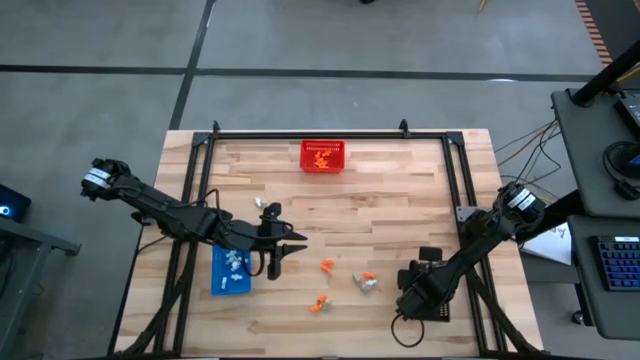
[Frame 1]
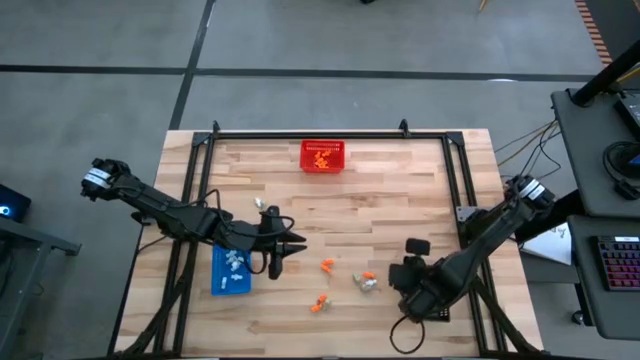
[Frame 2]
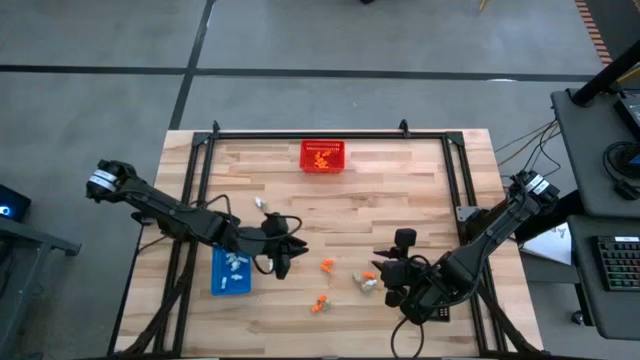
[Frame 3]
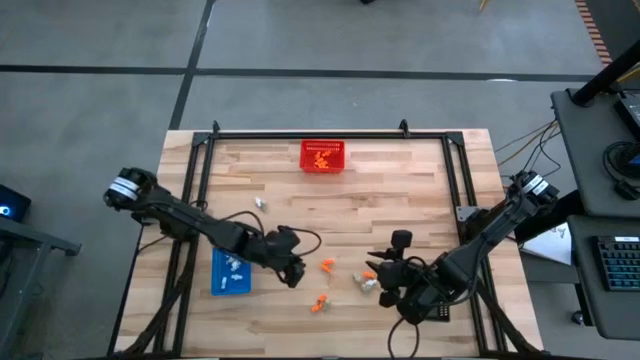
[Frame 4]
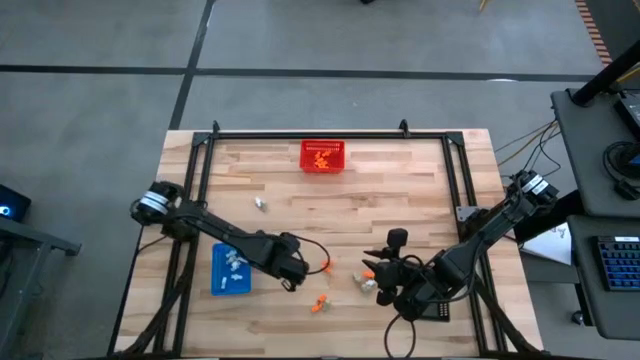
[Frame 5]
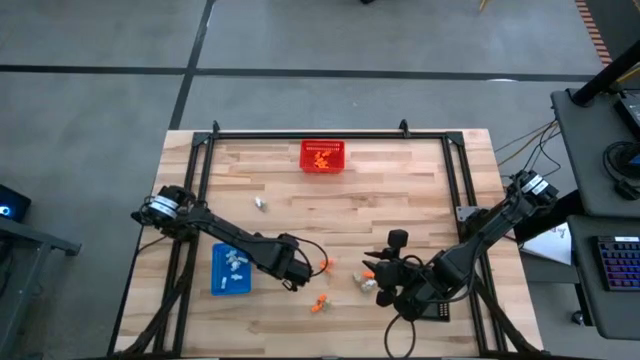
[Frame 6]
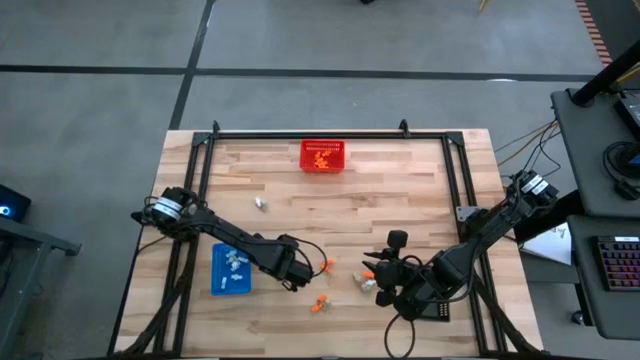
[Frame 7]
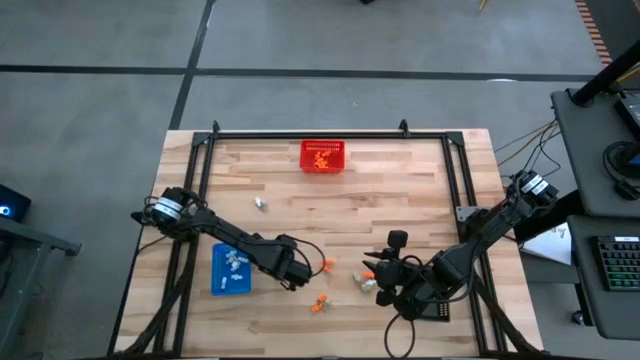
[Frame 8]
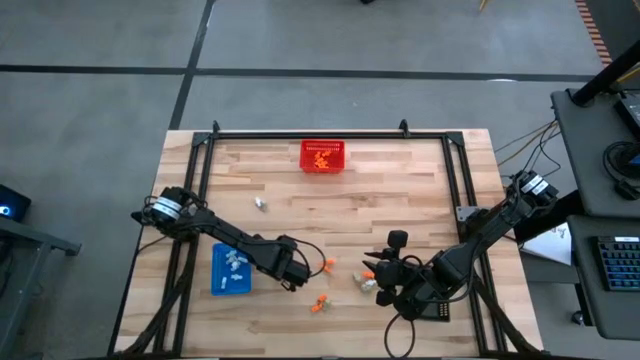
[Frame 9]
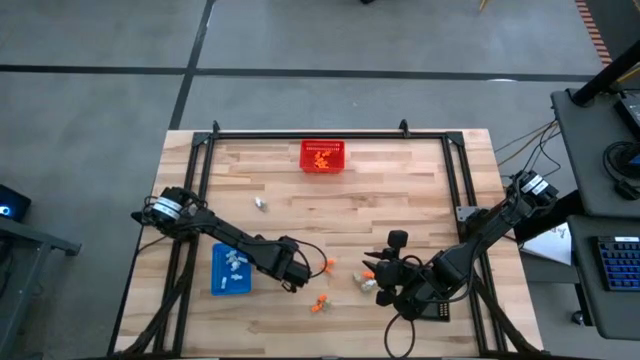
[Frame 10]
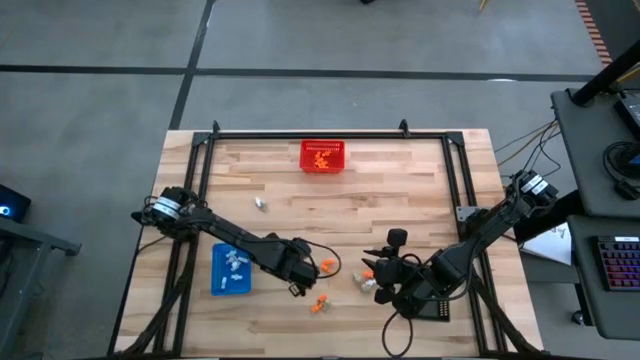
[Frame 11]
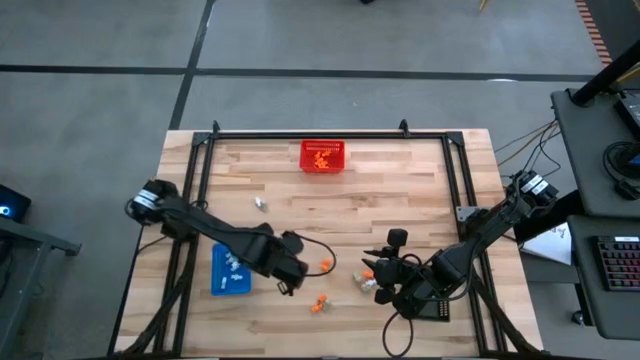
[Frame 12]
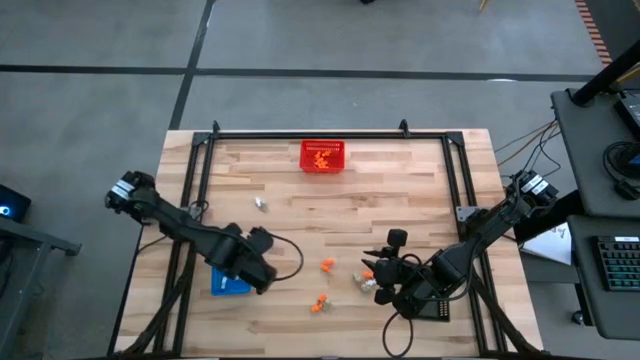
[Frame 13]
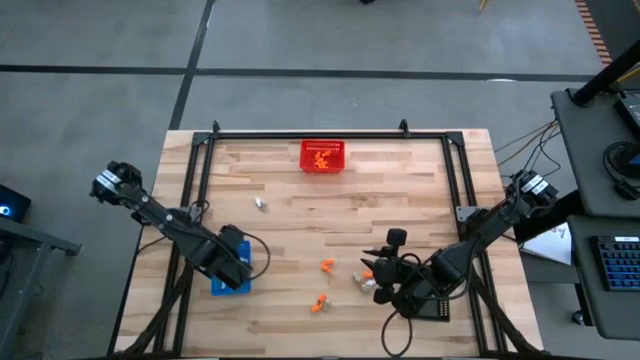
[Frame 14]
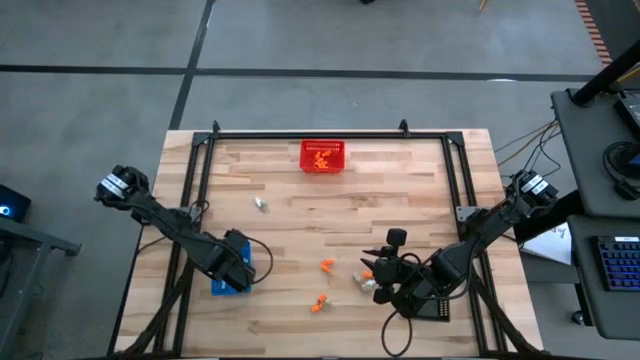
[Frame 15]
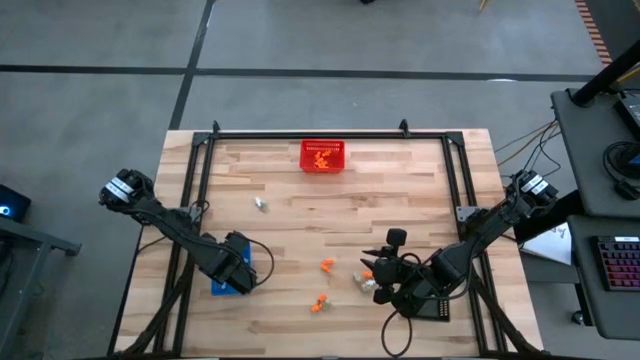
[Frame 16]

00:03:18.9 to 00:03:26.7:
Task: Sort Halloween decoration
Put the white skeleton toy into the blue bin

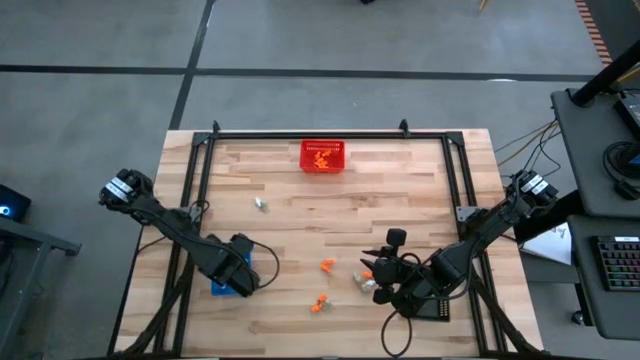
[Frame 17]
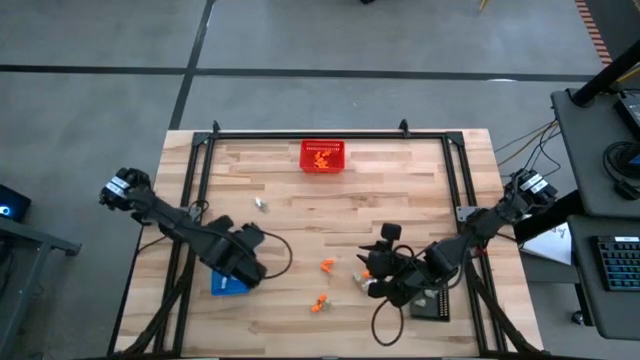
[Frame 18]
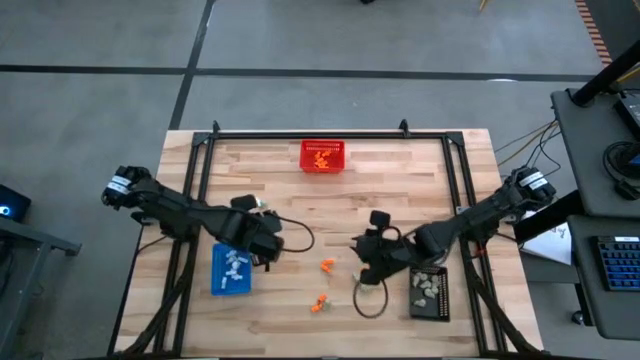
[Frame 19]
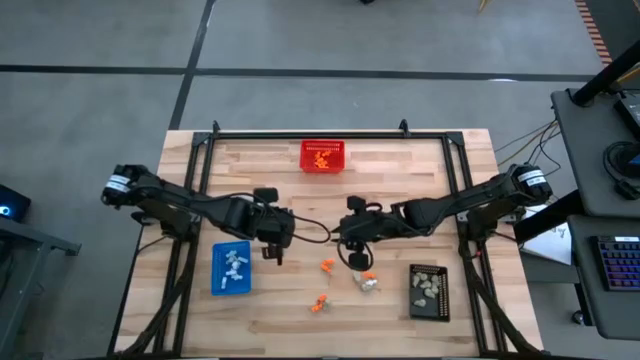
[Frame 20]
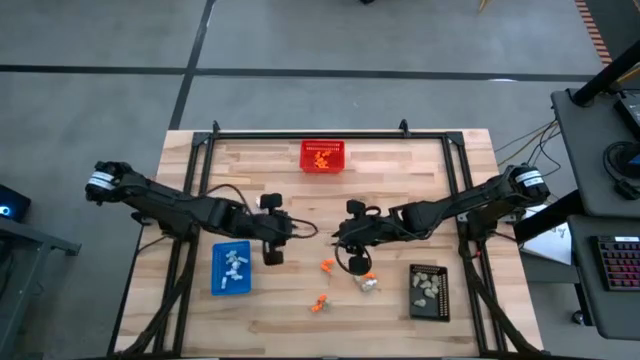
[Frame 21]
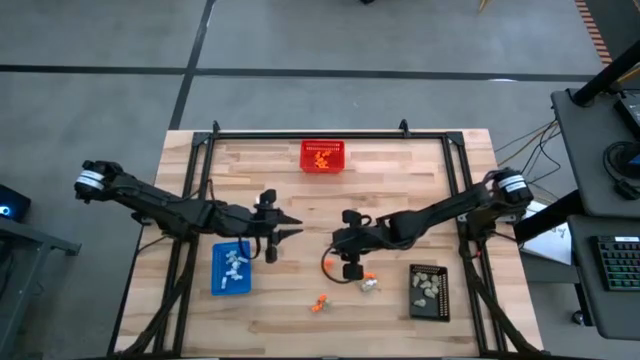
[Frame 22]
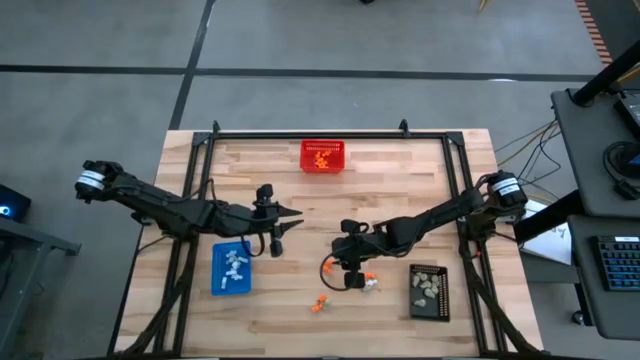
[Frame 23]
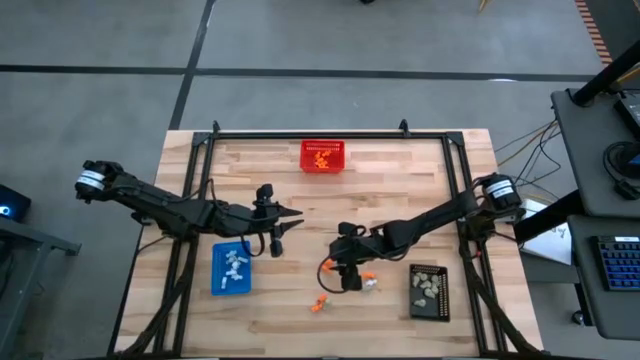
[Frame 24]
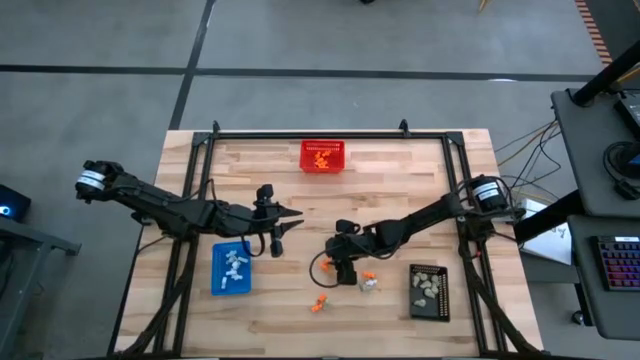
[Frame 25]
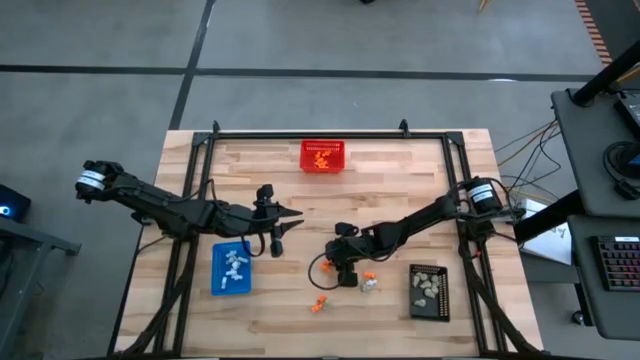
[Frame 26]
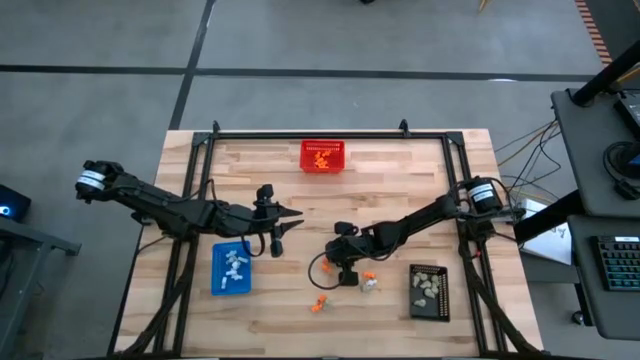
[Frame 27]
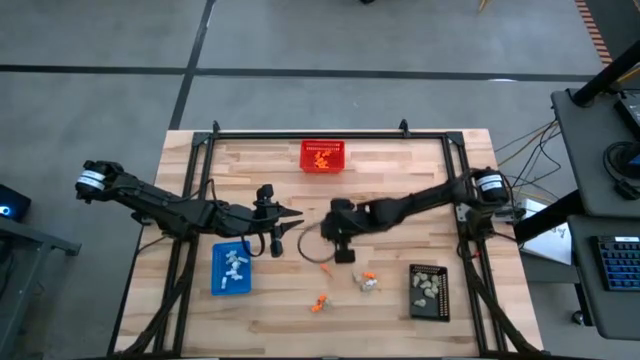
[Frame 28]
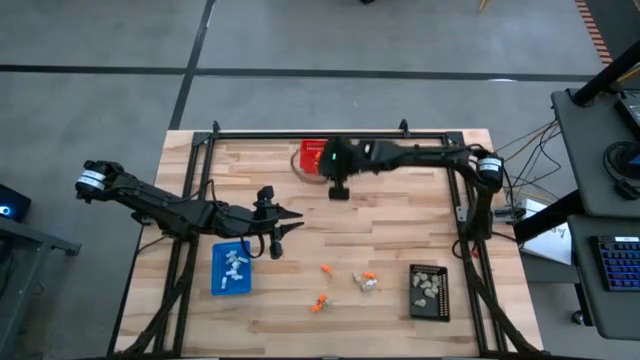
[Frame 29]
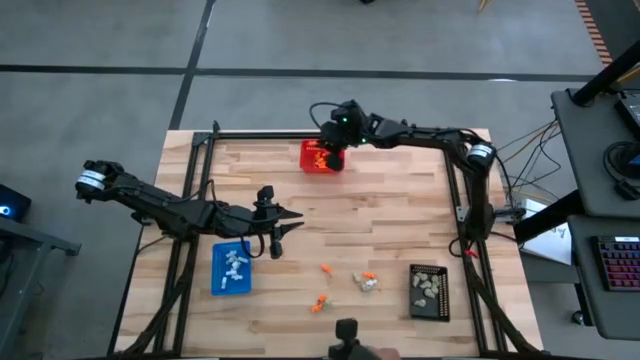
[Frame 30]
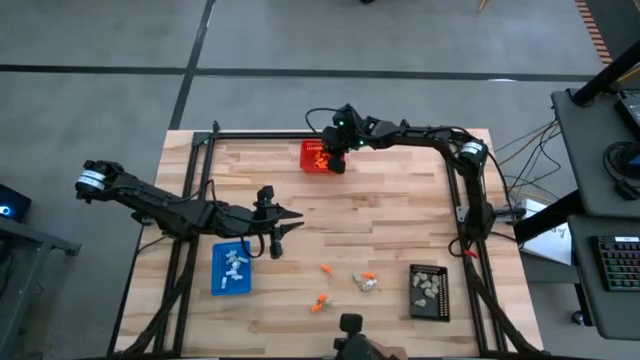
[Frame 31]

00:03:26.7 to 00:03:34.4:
Put the orange skeleton toy into the red bin

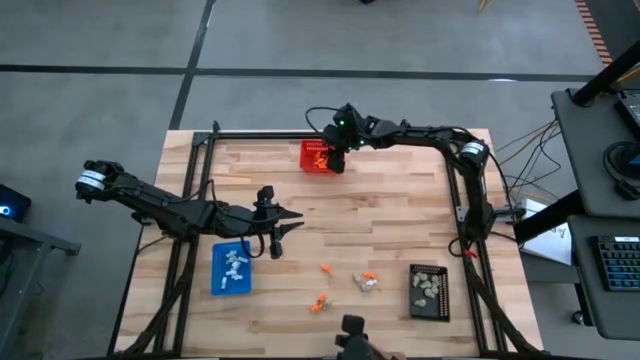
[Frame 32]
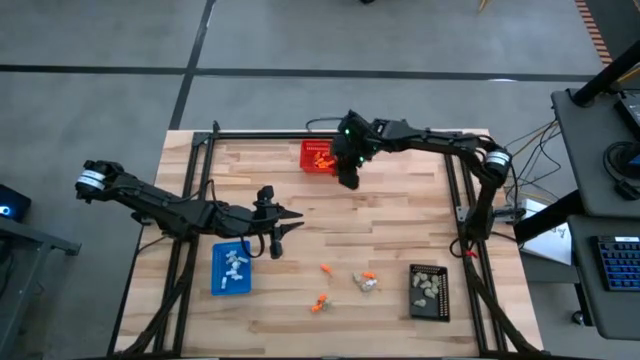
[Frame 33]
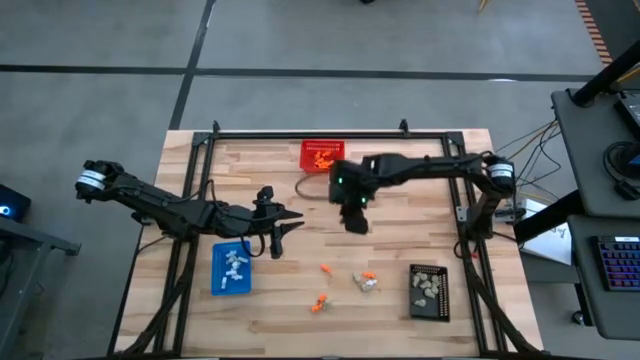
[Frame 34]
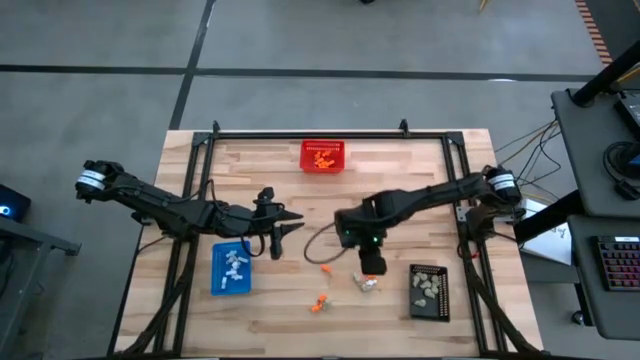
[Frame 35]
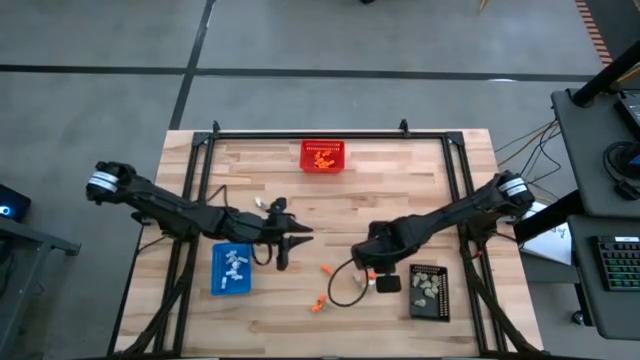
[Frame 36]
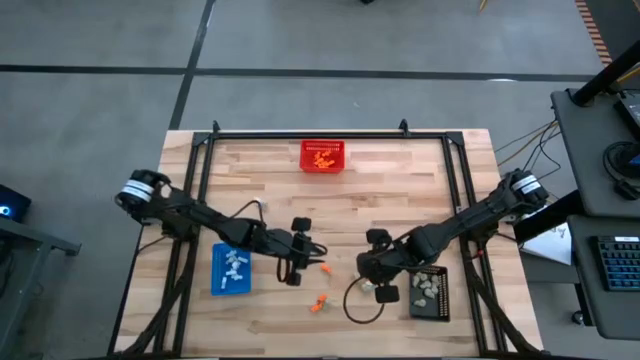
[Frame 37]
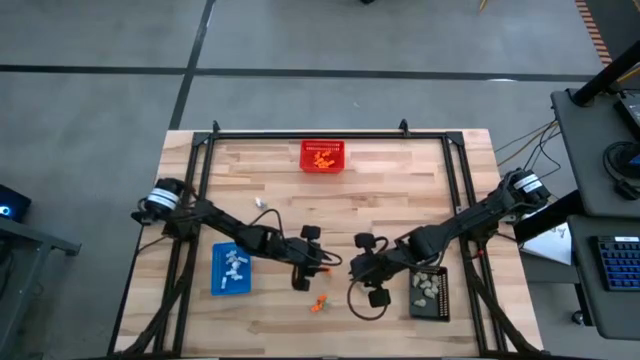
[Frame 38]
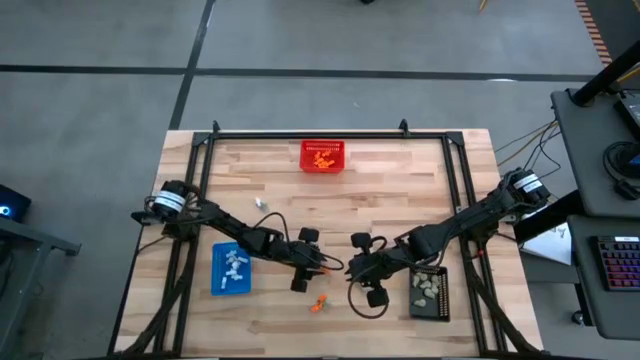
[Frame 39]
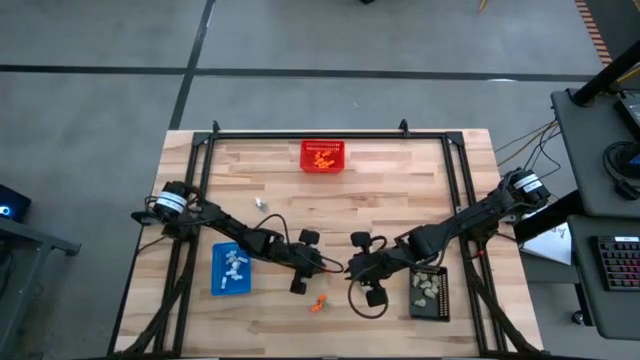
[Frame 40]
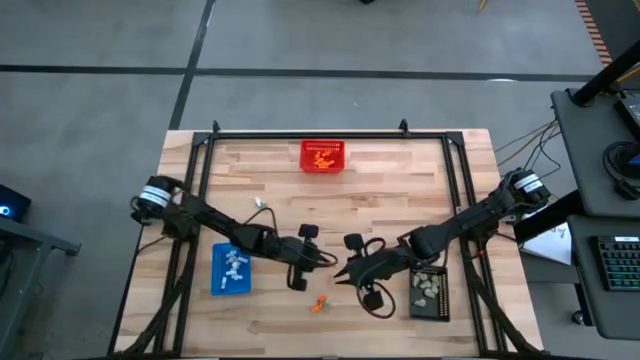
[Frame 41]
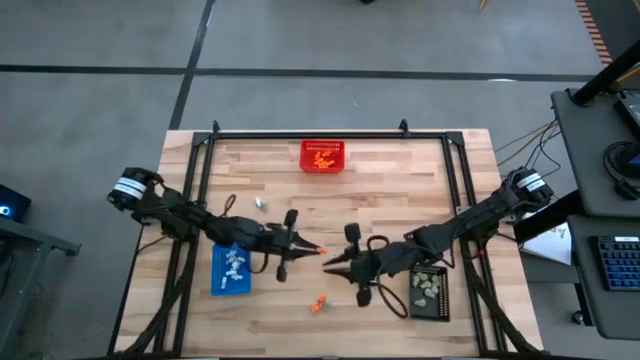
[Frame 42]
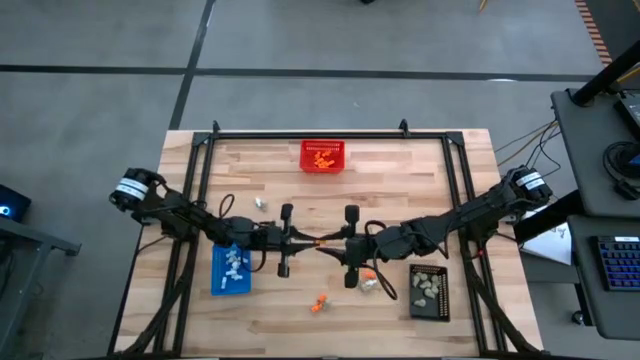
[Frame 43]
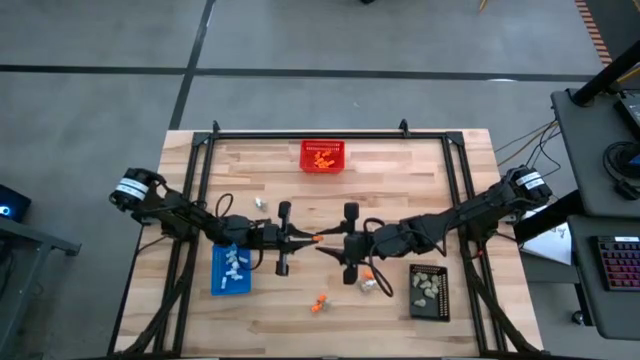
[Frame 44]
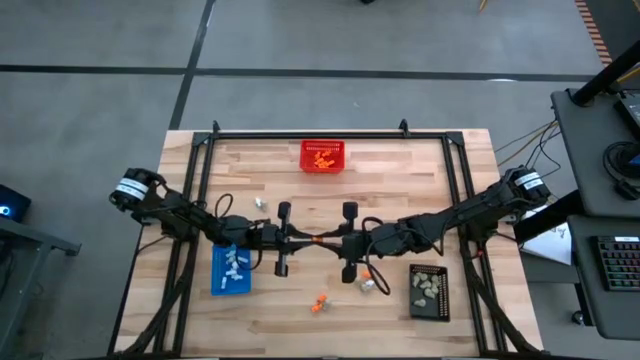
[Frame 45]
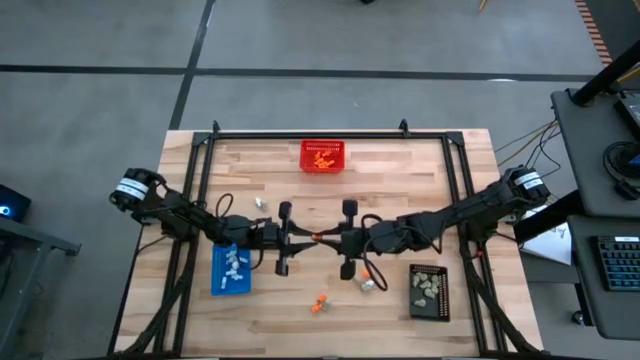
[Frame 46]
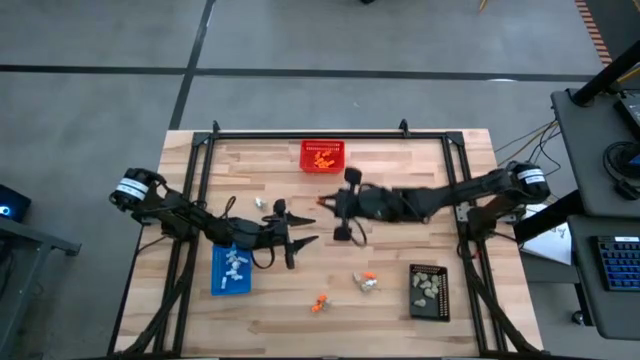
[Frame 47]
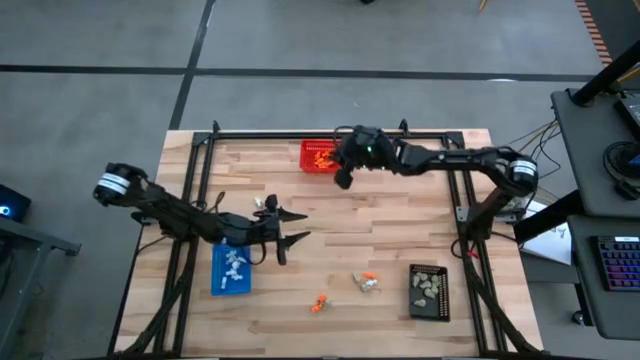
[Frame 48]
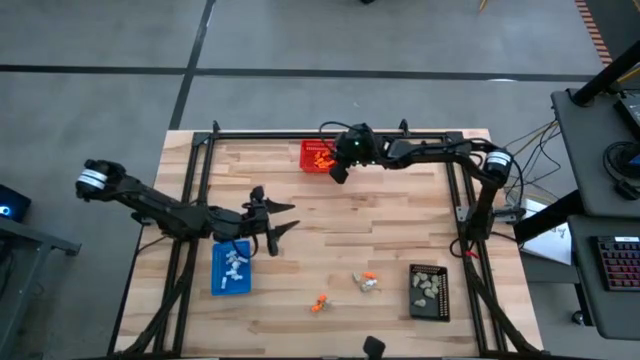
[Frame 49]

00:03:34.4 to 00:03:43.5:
Put the orange skeleton toy into the red bin
